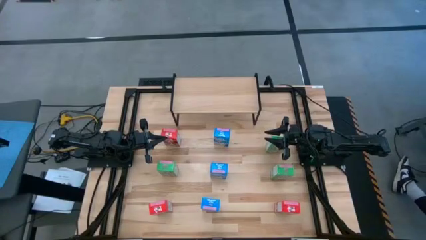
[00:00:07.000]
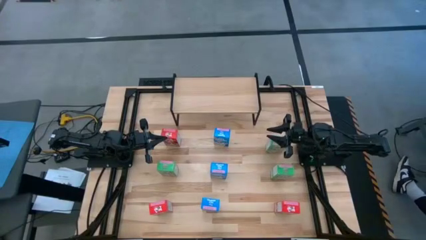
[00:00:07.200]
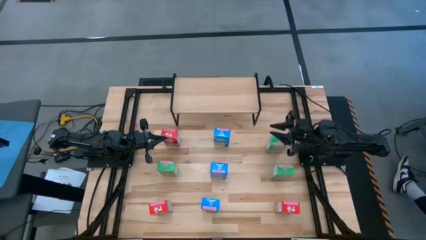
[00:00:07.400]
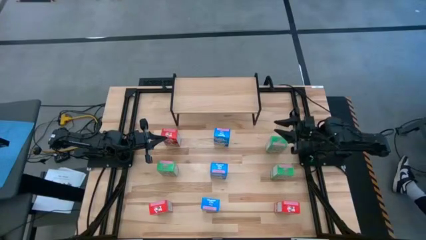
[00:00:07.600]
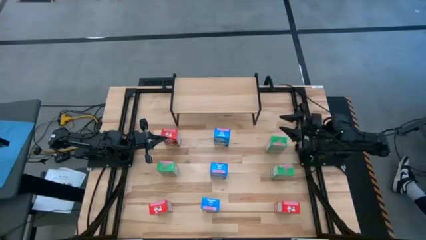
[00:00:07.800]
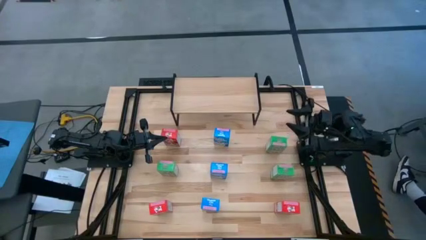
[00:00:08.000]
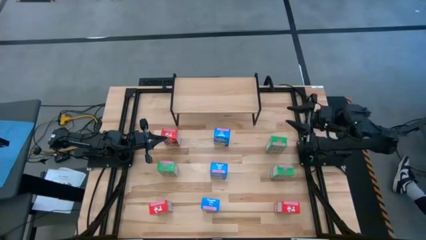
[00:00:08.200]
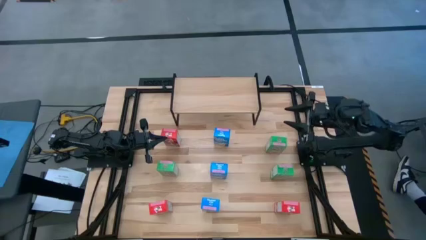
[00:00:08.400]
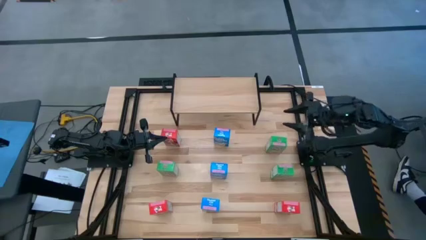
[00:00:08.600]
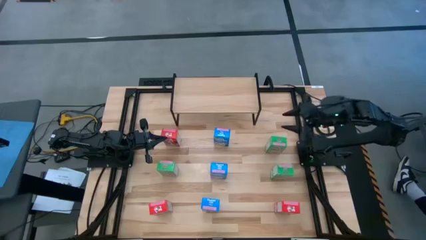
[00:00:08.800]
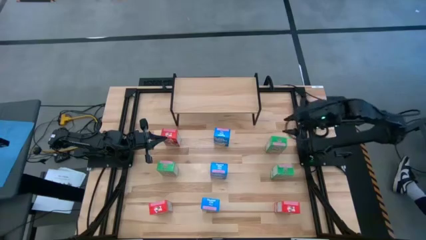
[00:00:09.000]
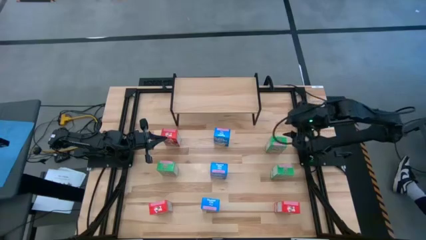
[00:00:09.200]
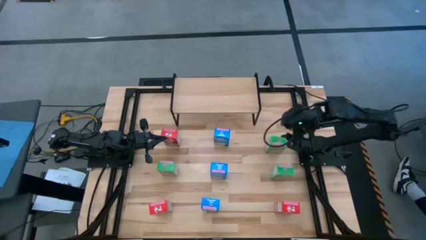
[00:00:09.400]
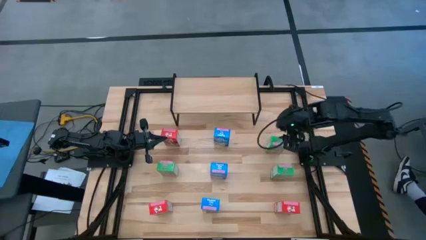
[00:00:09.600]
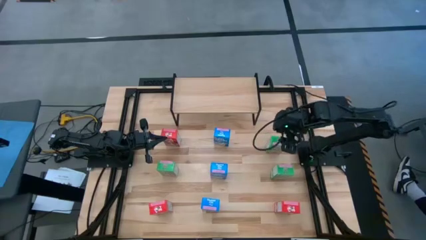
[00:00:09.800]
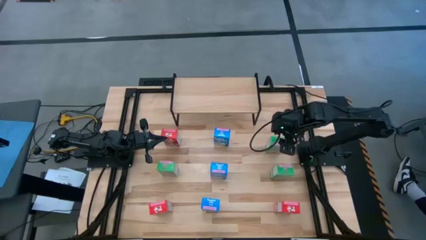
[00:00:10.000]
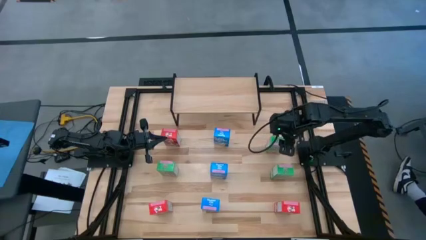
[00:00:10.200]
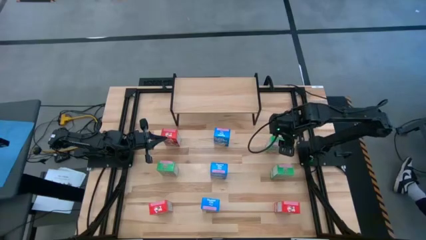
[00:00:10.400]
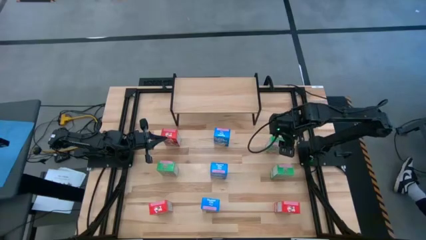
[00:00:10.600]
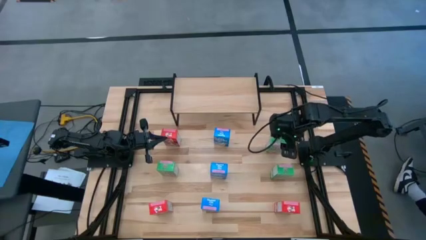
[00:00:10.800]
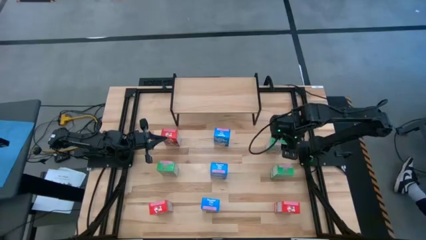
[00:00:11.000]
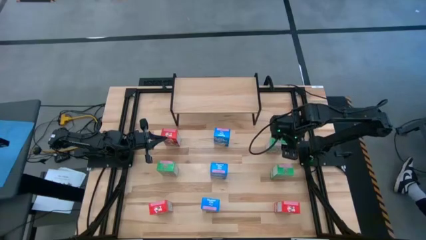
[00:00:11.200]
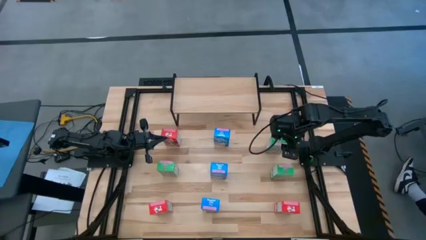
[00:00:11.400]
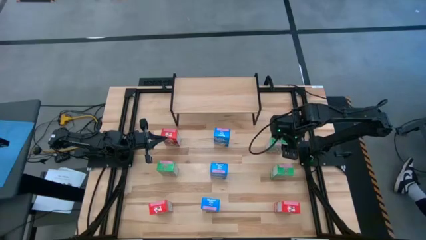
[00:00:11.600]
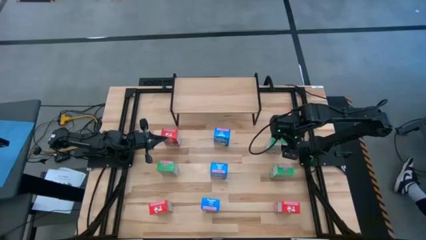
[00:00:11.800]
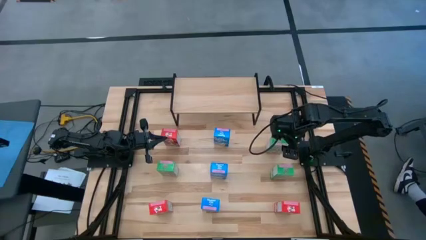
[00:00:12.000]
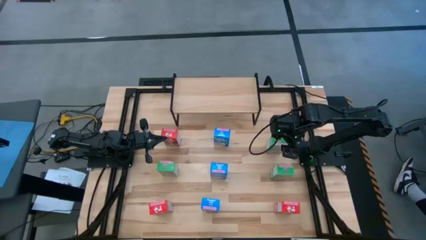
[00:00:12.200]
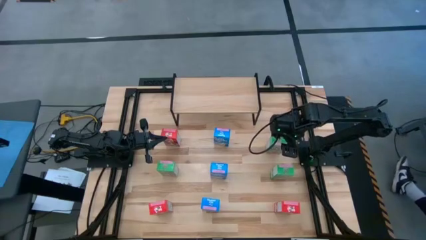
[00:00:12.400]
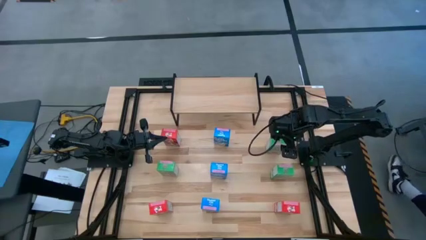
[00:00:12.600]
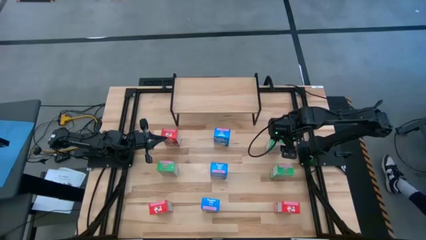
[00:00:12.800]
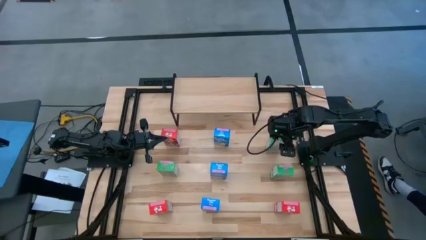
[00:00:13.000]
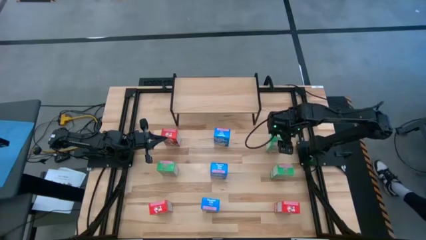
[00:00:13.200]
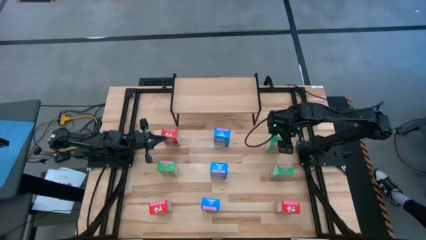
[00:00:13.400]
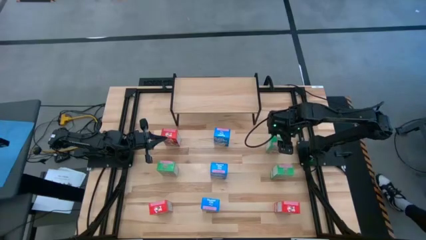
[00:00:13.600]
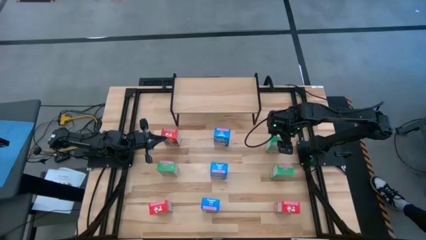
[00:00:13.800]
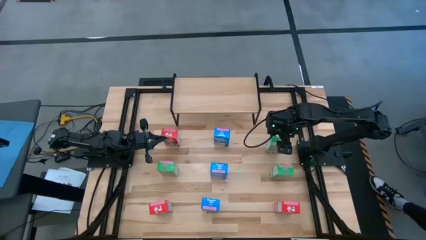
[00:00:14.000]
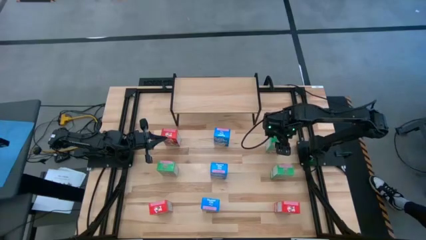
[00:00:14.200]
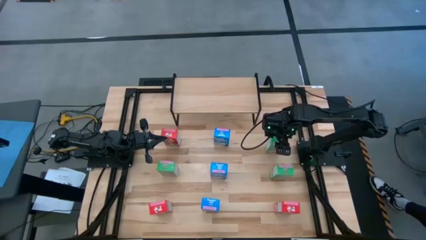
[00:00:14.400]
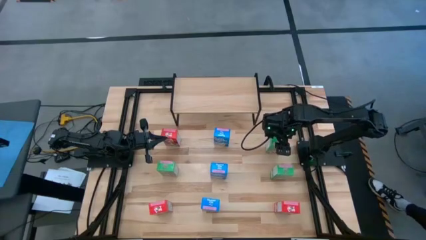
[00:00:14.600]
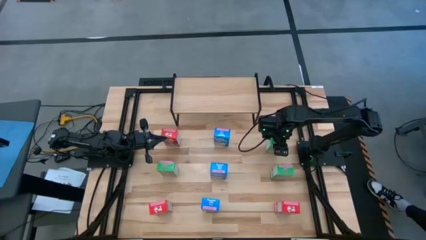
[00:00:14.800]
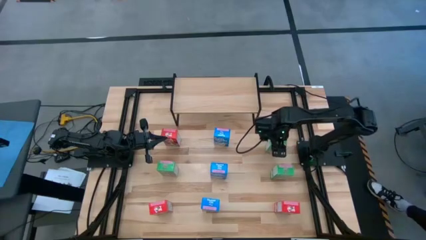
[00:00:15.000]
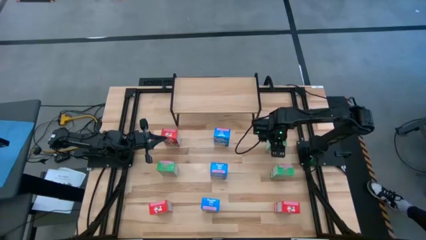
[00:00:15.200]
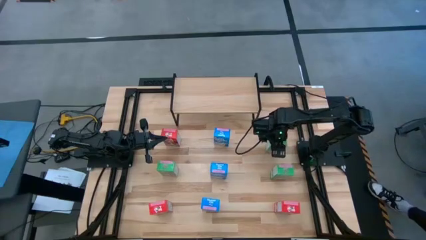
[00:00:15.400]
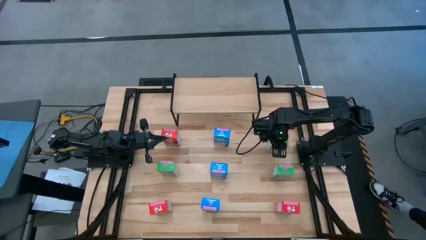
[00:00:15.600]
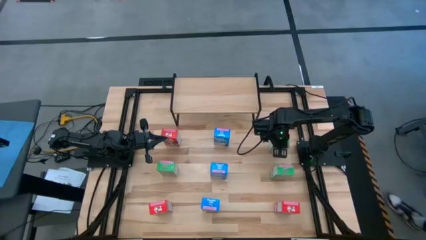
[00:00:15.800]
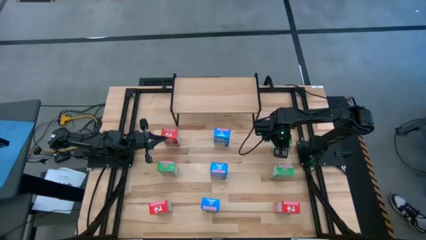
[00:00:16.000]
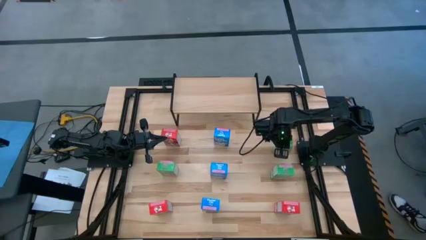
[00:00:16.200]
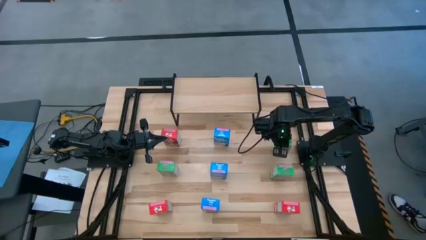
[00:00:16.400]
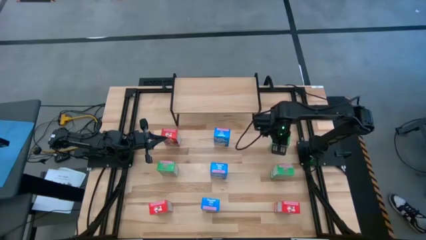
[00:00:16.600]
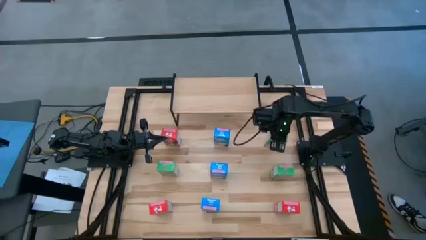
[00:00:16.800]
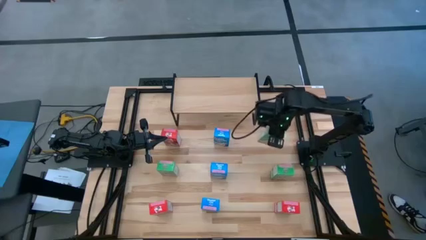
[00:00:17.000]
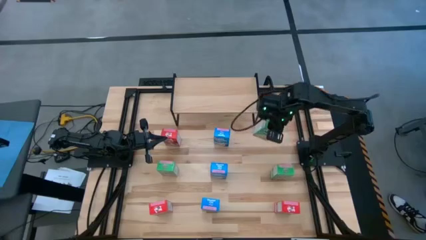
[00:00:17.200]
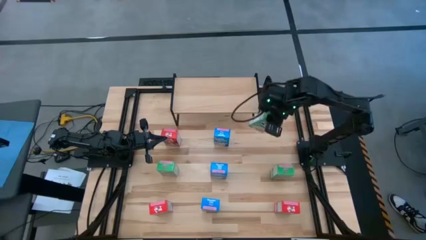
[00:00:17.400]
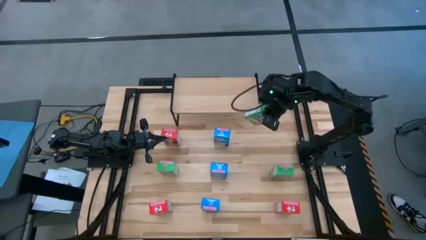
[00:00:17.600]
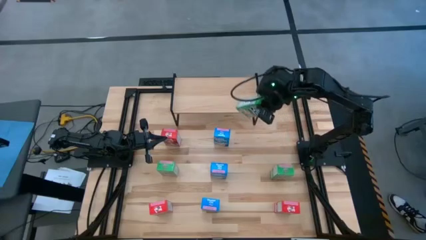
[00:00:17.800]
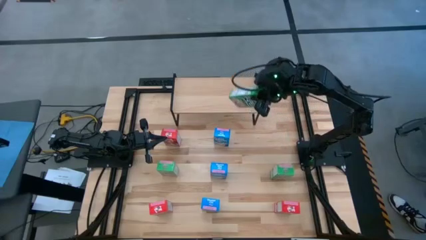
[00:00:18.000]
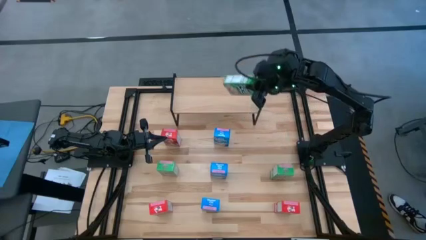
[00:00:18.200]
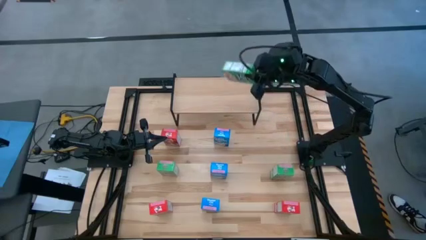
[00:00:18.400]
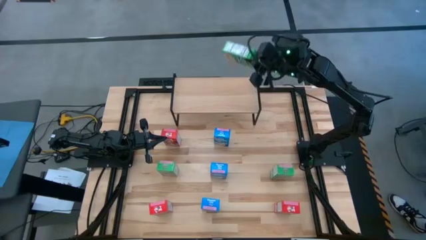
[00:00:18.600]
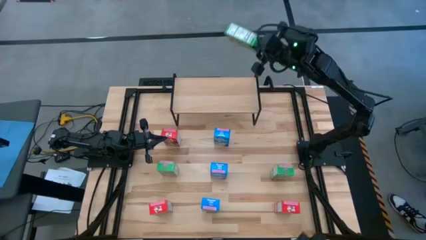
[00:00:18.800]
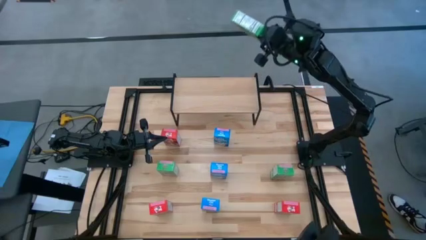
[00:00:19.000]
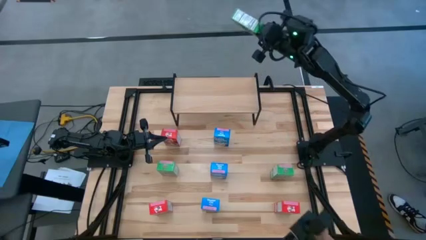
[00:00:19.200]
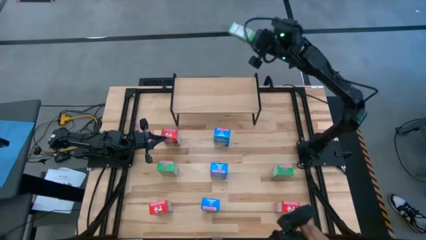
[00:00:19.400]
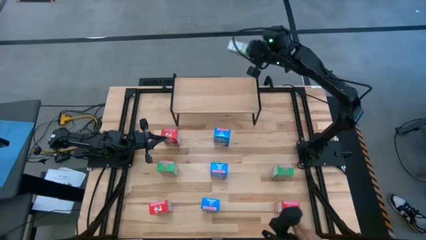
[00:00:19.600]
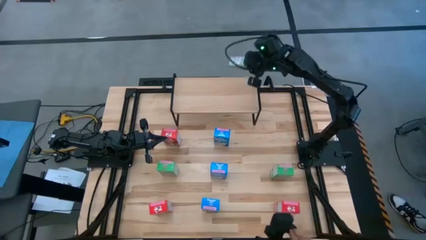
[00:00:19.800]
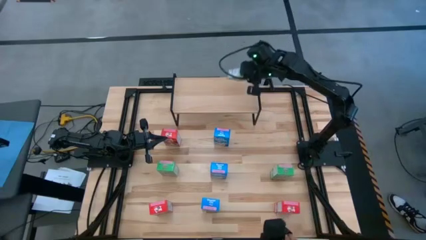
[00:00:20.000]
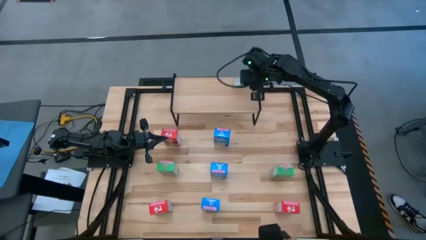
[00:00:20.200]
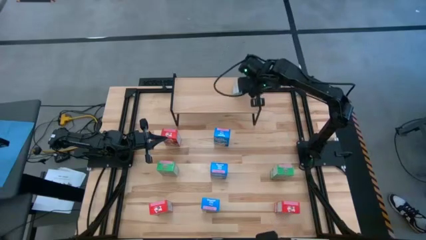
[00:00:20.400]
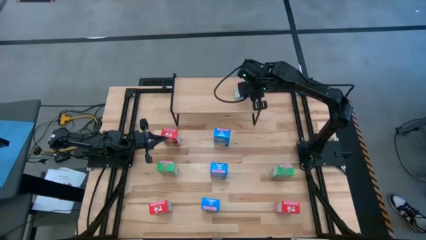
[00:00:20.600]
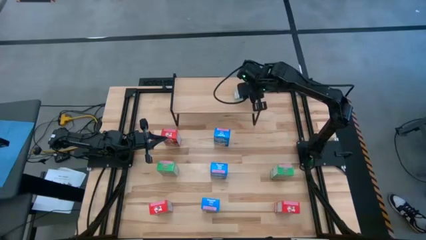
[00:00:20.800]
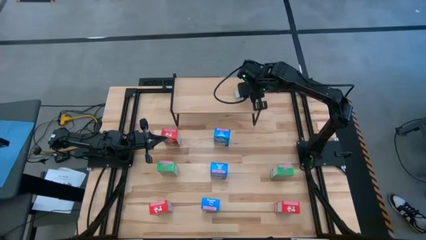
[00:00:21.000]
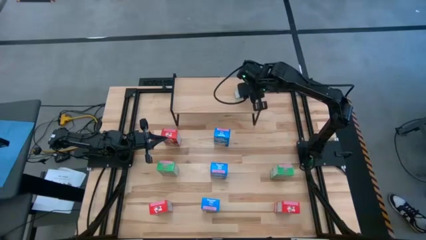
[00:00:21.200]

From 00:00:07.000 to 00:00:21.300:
Task: Stack cereal on shelf
Put the top green cereal box on the shelf
